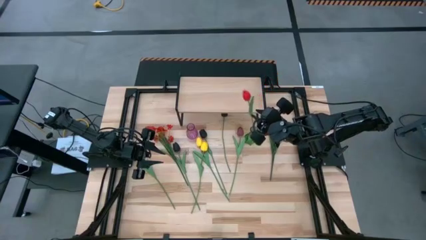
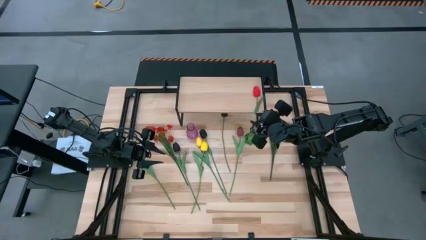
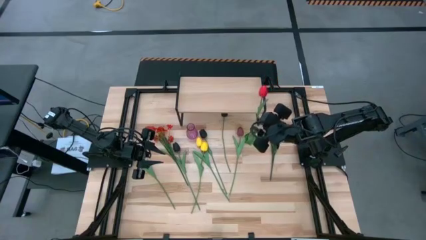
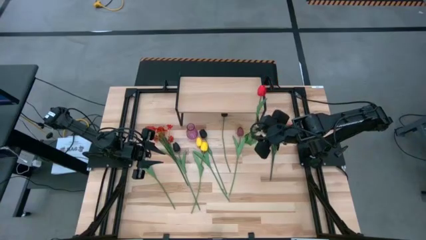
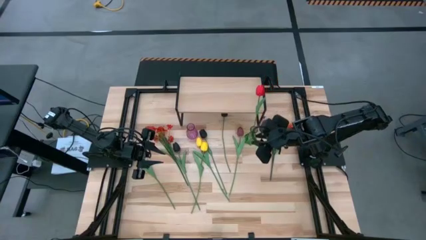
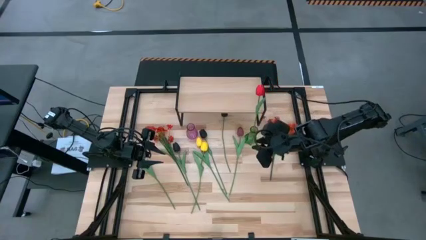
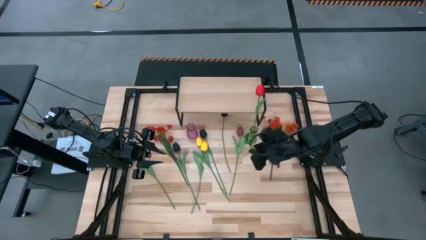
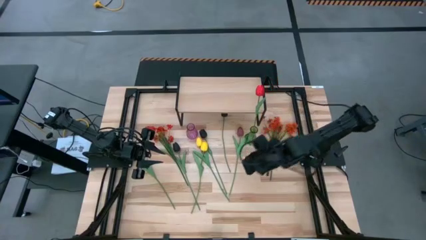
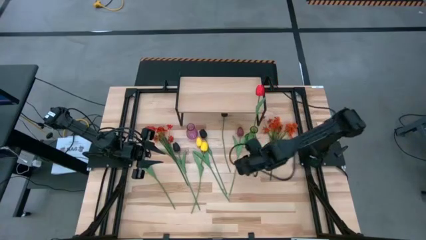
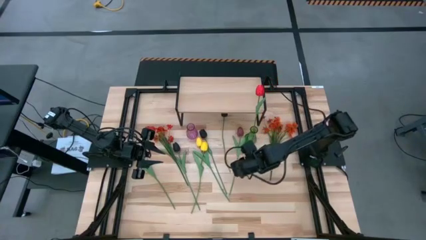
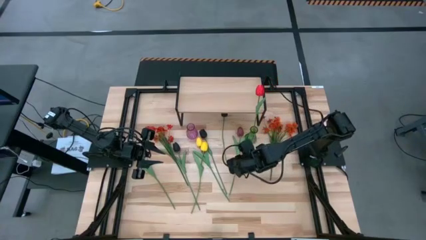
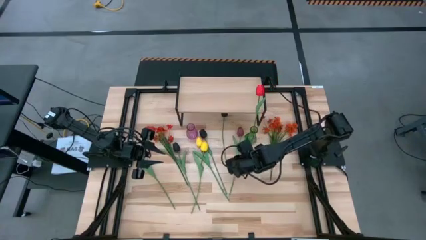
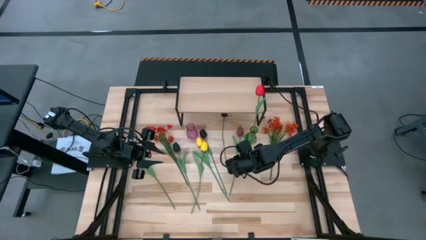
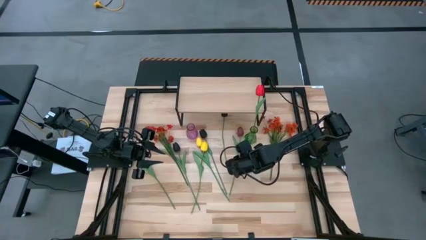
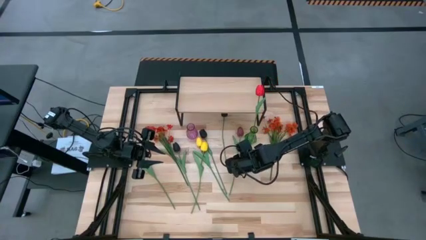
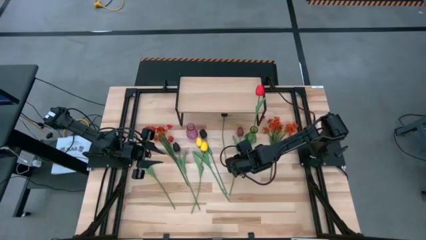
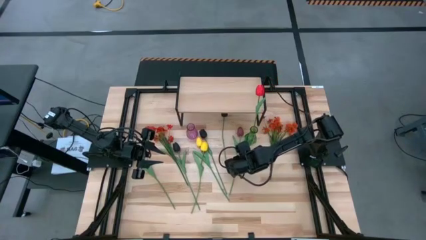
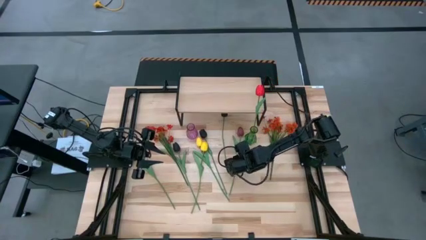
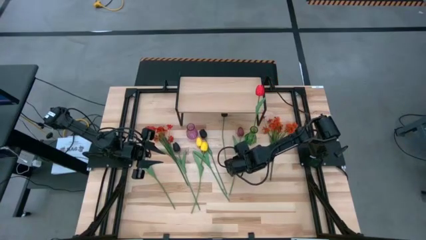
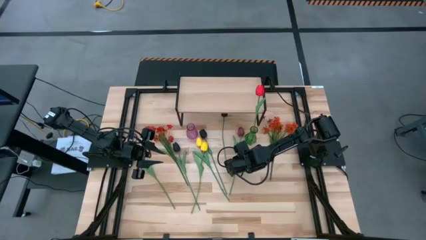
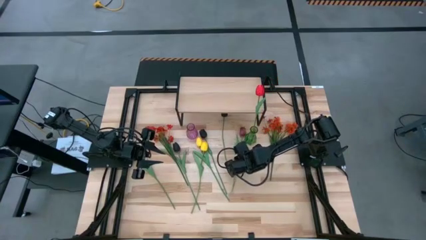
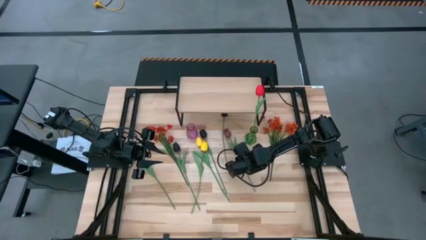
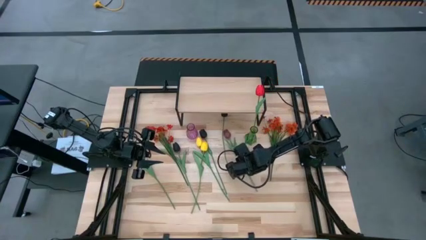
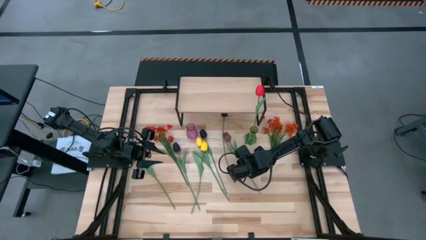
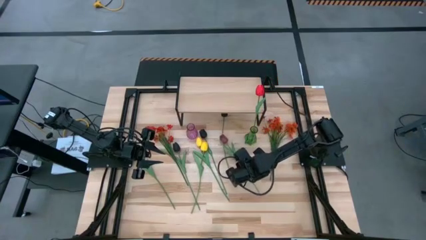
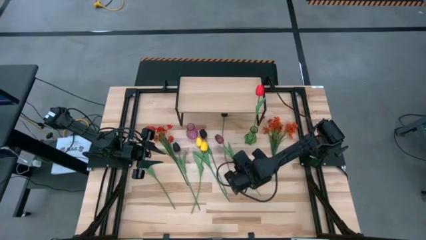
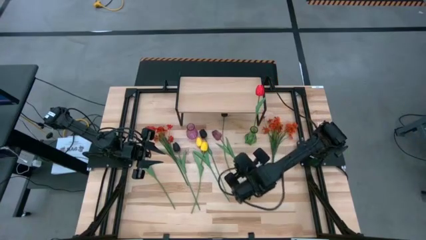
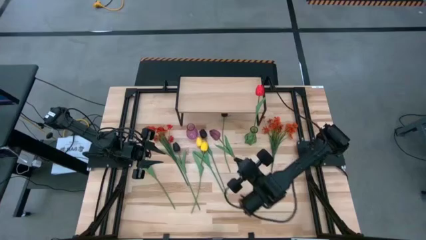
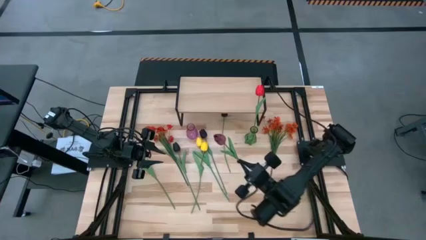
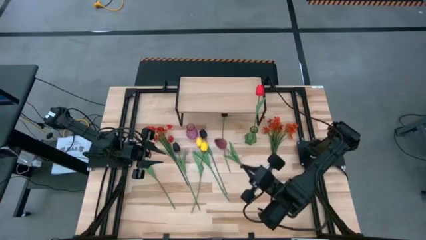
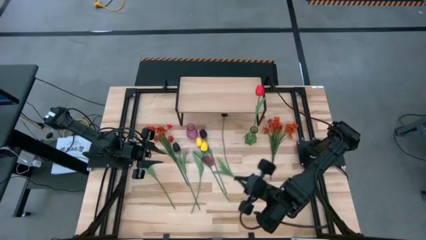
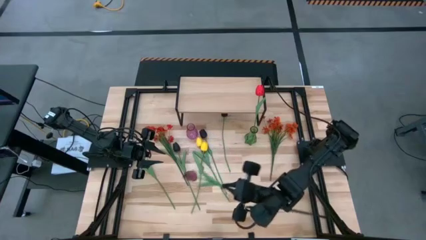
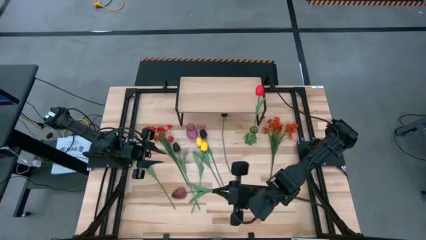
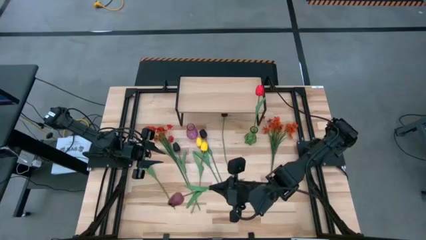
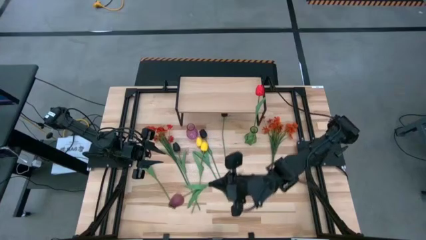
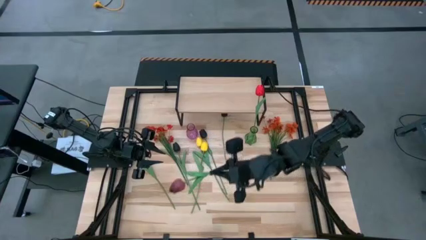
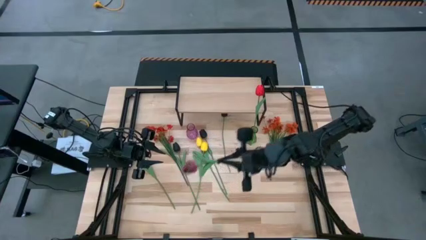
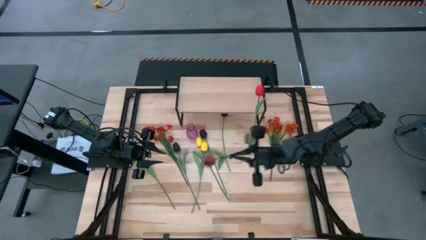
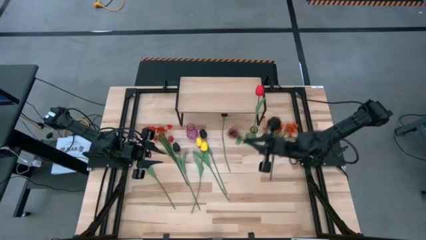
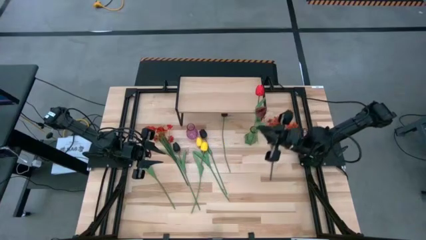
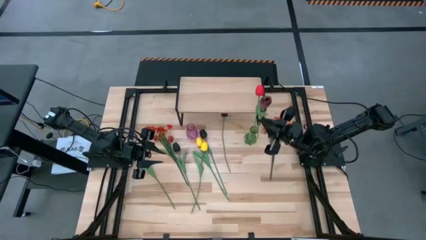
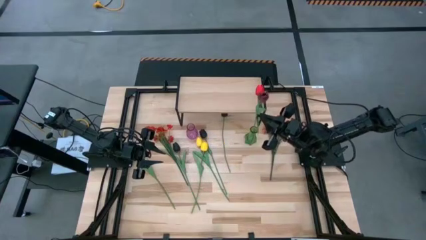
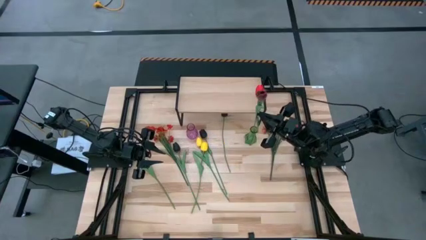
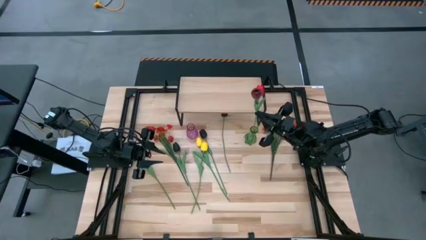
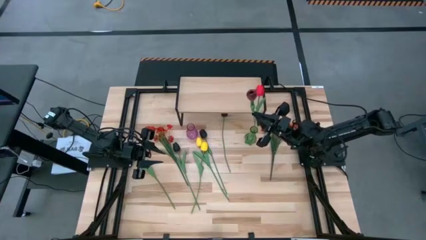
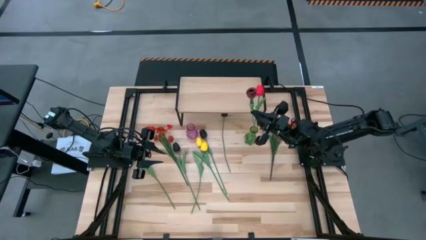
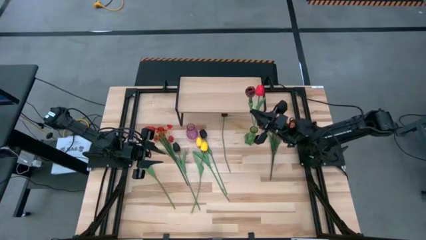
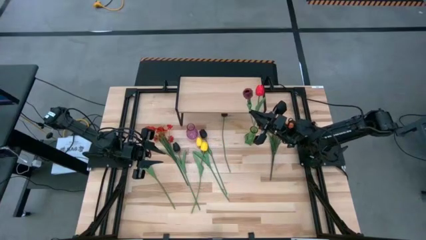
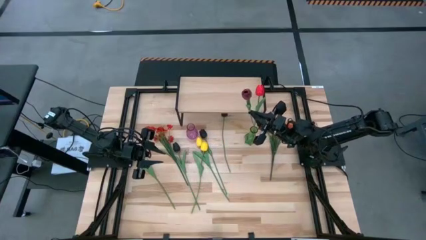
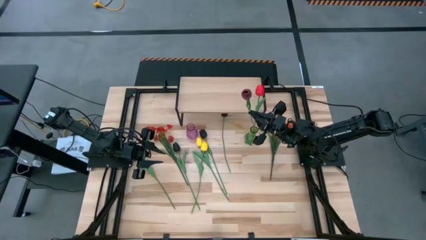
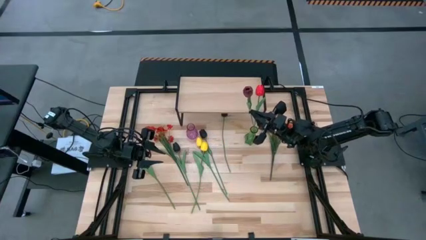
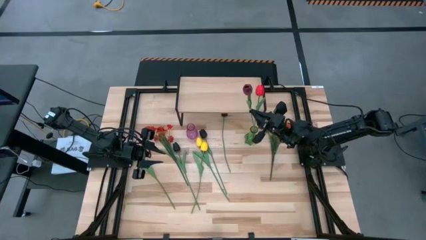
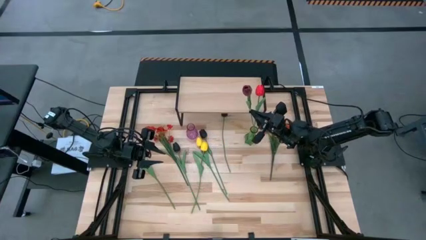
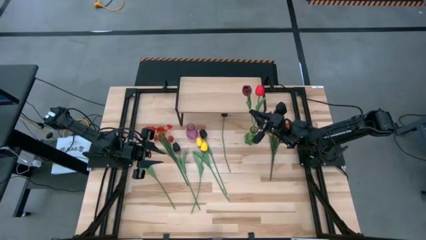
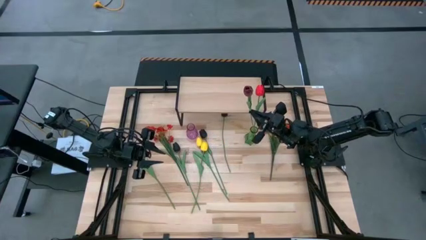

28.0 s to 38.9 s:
Task: Pick and place flowers into a vace then onto a shelf
Put the dark red tulip into the green vase
